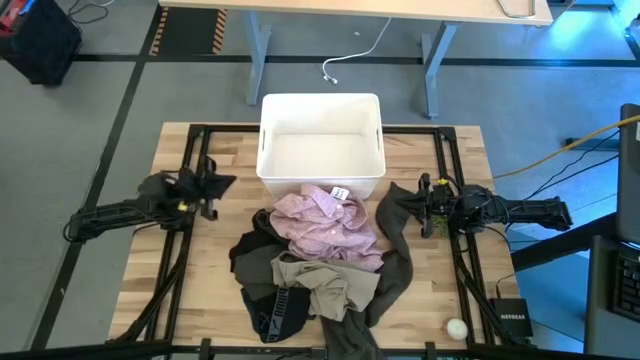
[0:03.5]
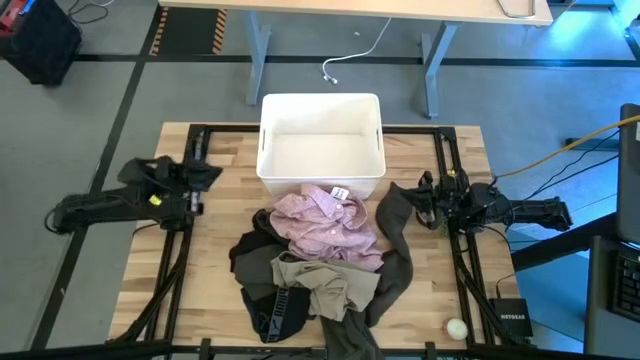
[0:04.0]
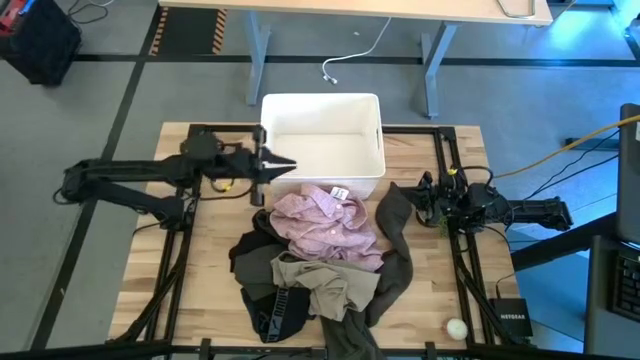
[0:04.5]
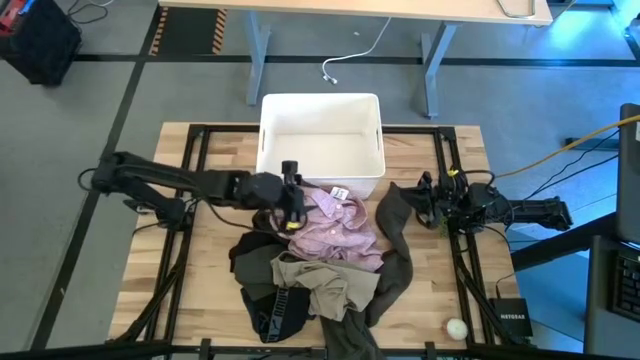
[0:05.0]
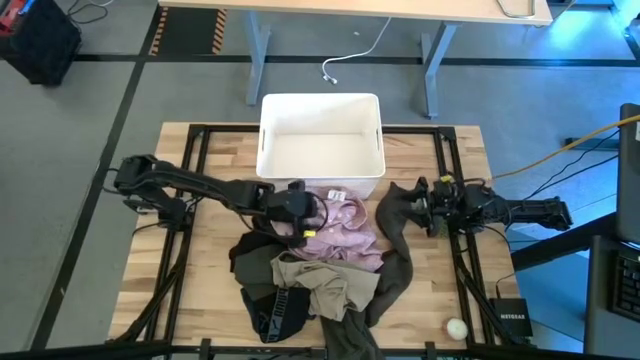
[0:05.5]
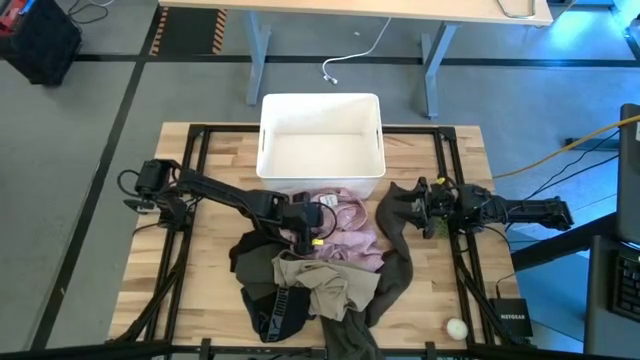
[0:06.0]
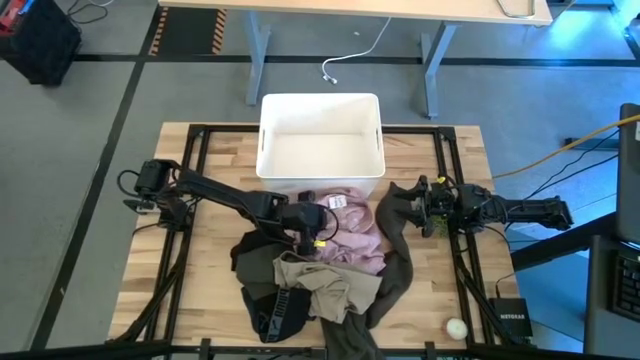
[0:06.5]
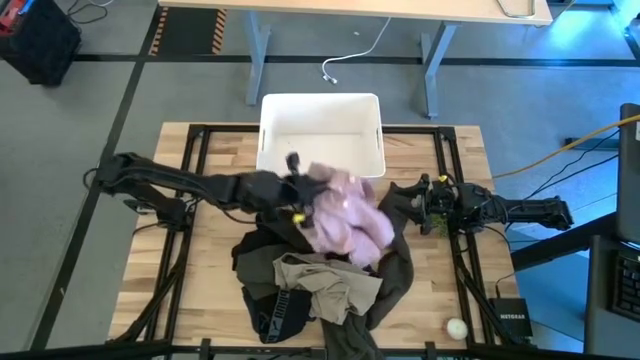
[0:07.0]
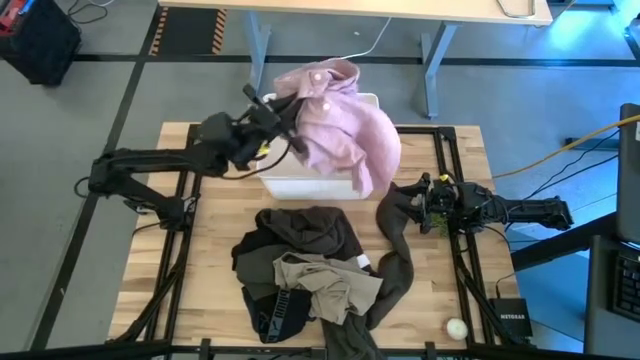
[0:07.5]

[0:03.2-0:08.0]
Task: Sort clothes
Put the pink shirt into the white bin

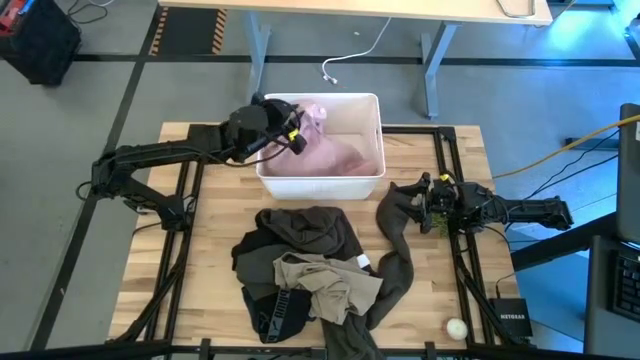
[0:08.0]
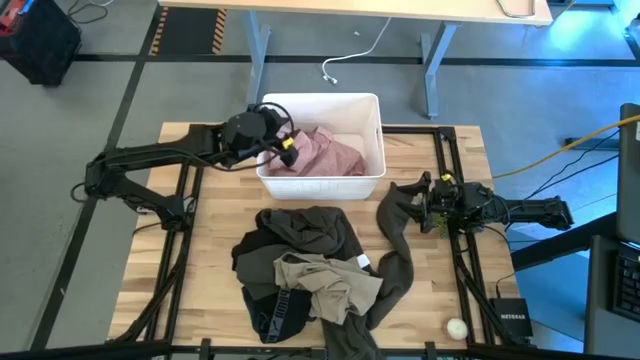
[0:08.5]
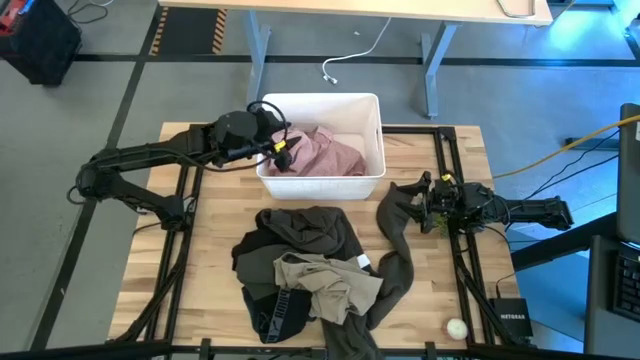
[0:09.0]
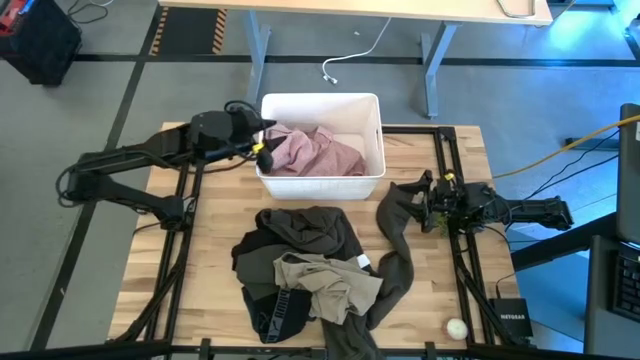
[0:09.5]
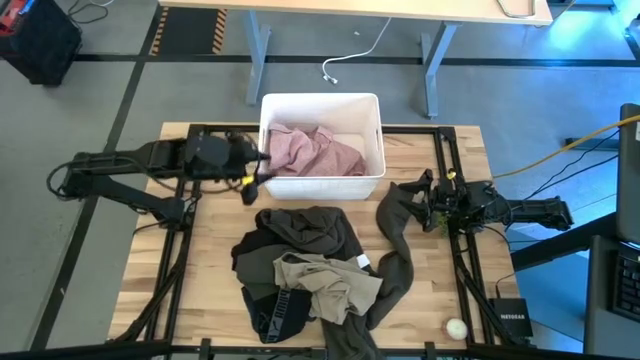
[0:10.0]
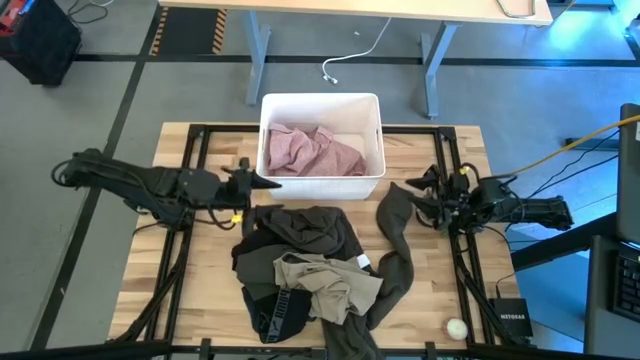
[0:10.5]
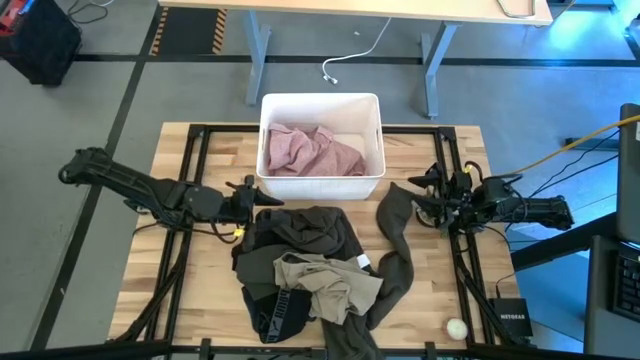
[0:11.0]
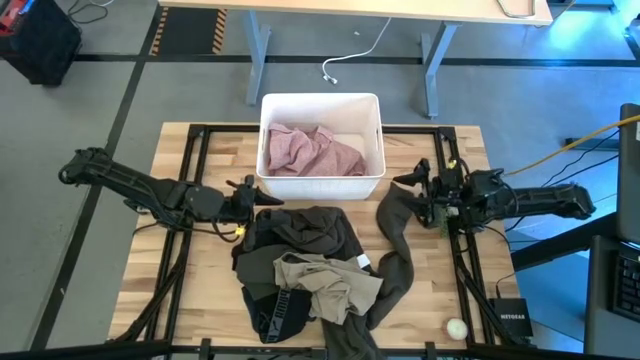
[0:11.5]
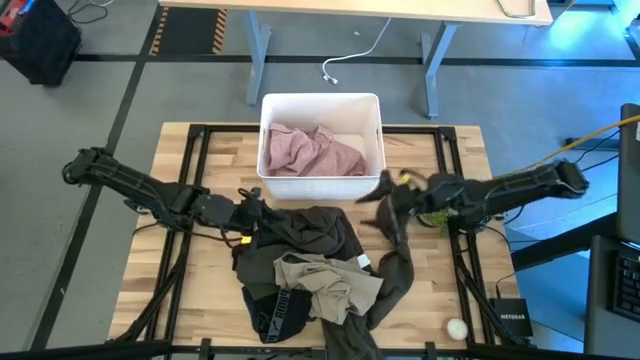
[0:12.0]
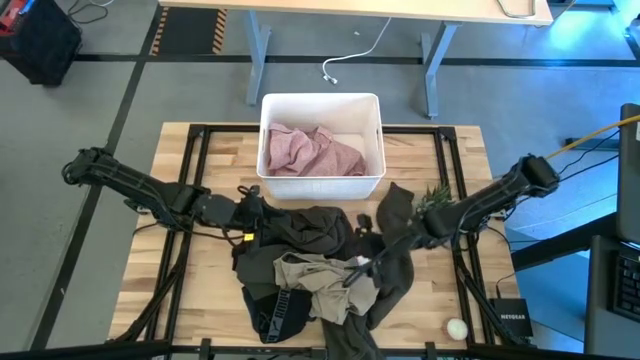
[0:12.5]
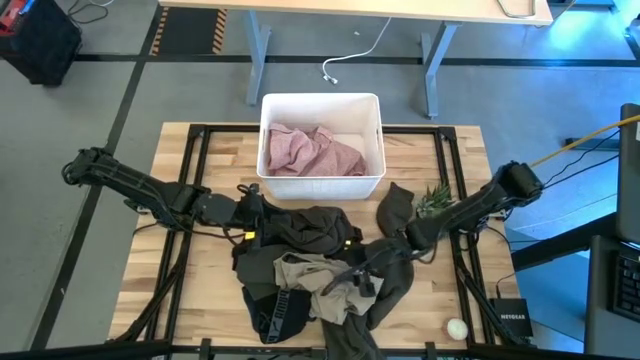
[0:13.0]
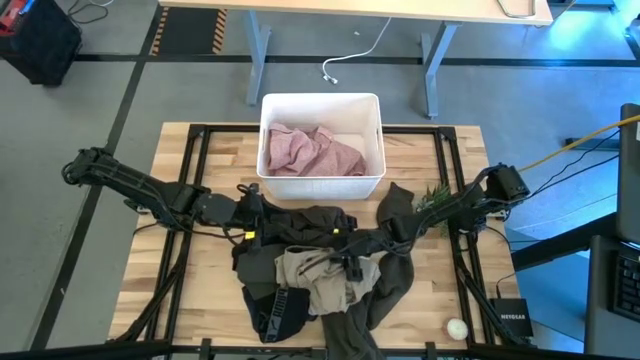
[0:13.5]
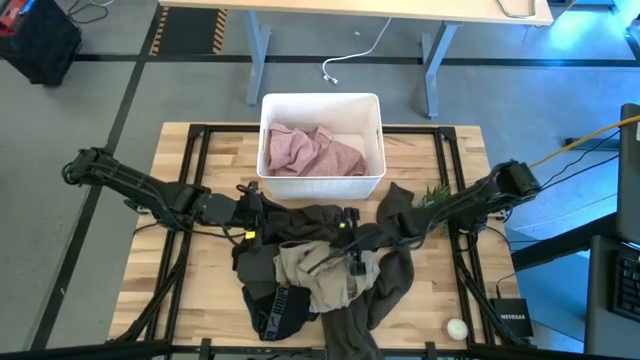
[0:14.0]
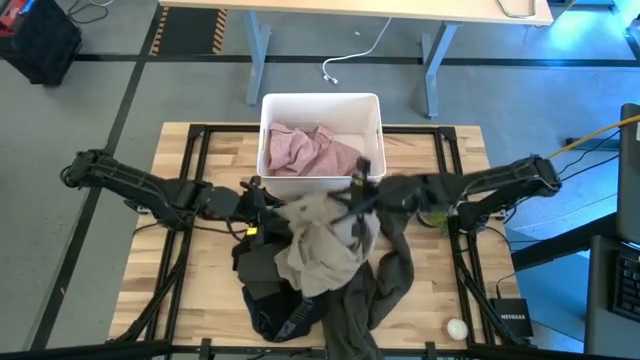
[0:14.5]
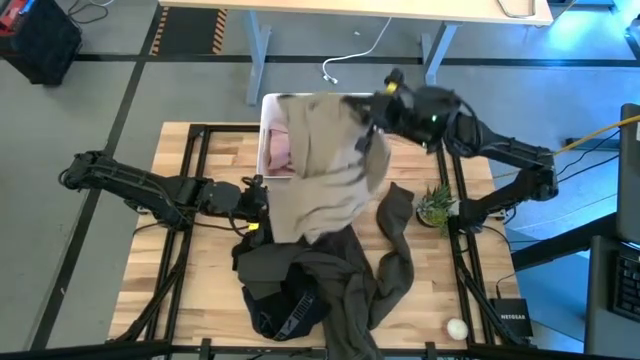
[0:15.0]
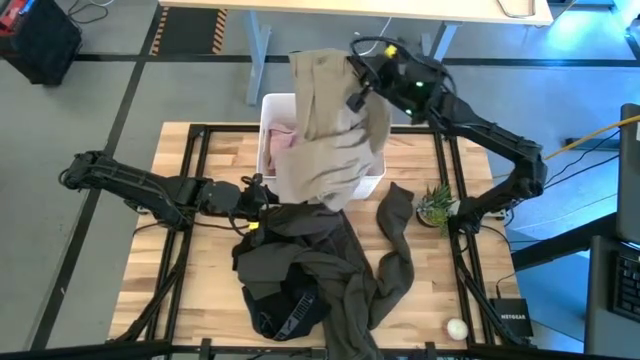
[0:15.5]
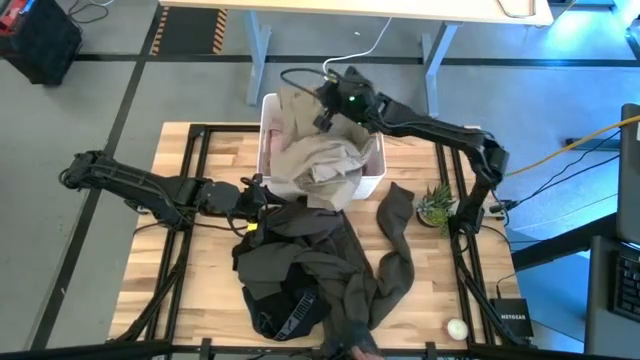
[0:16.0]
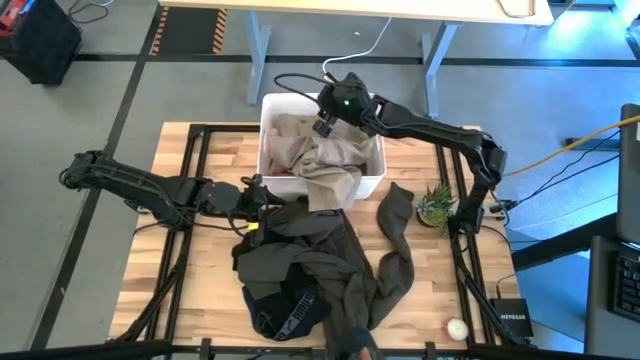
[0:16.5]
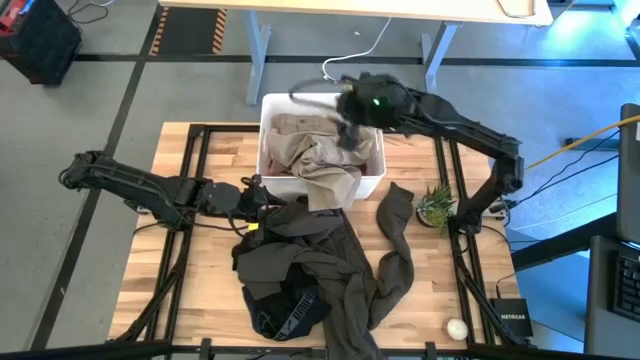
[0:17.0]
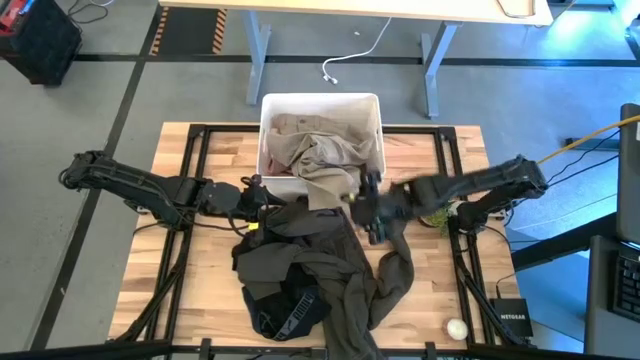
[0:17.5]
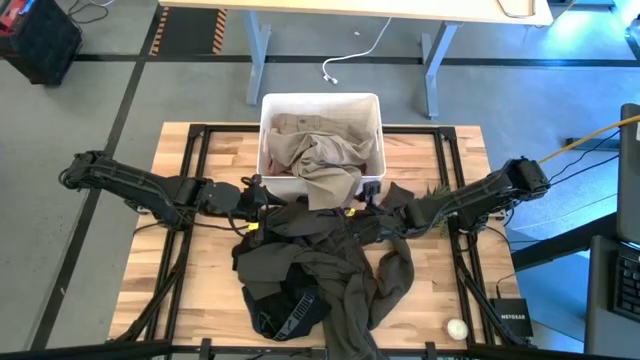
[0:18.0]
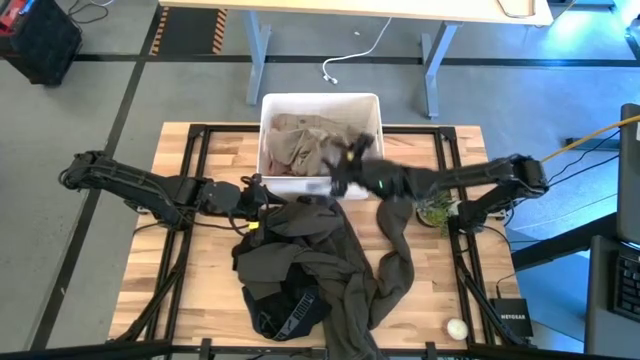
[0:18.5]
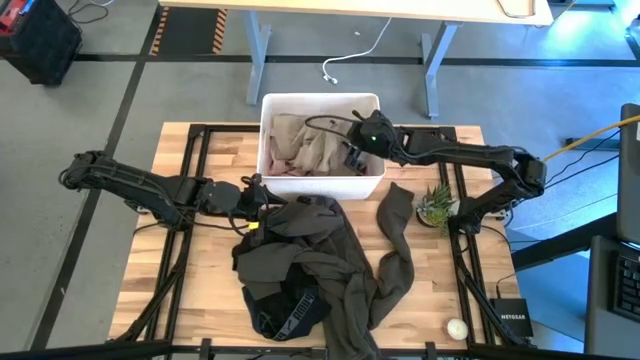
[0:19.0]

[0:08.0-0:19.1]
Put the gray pants into the white bin

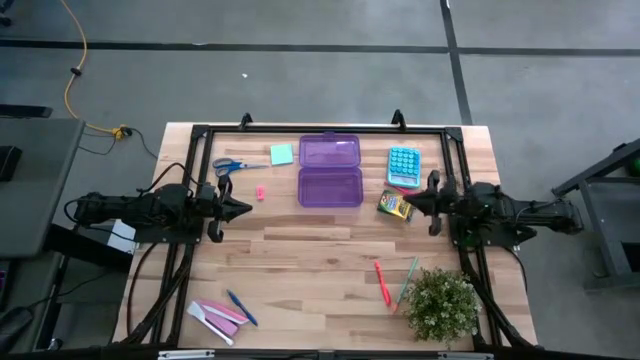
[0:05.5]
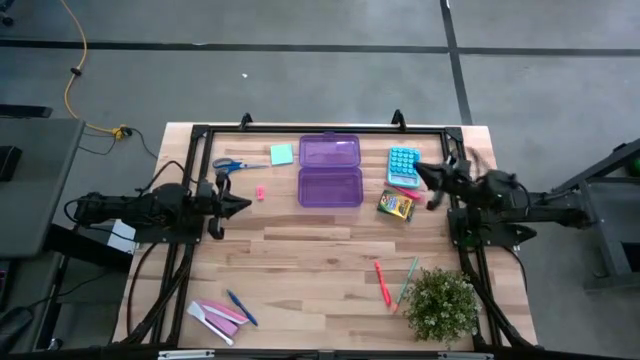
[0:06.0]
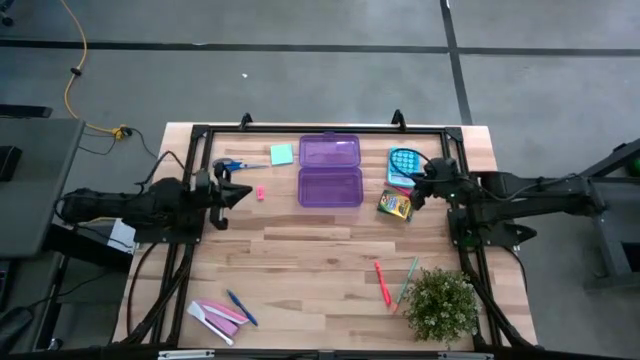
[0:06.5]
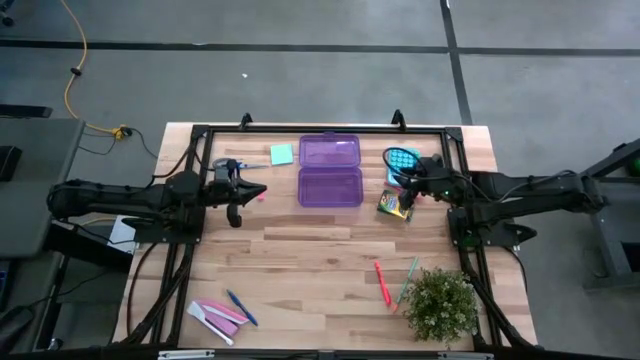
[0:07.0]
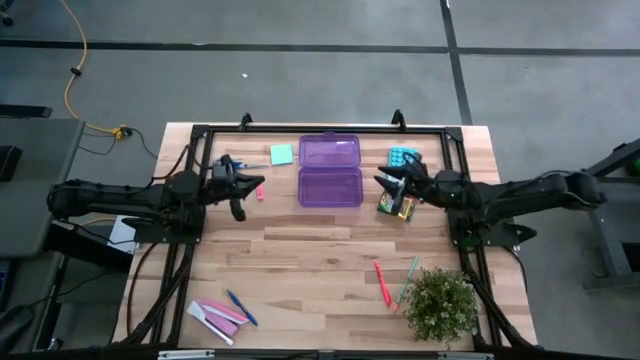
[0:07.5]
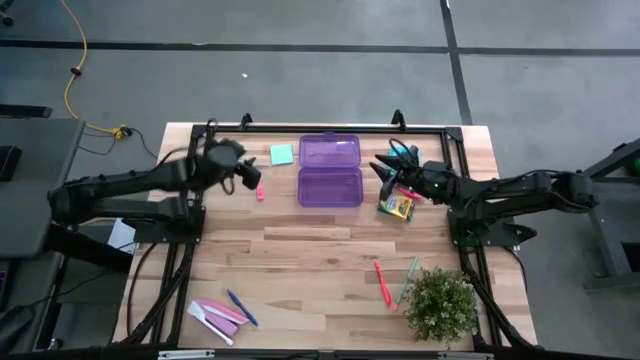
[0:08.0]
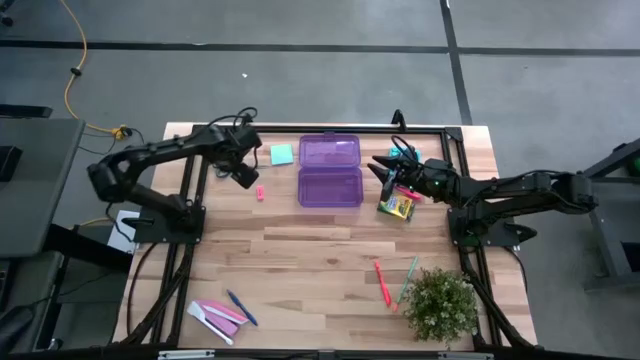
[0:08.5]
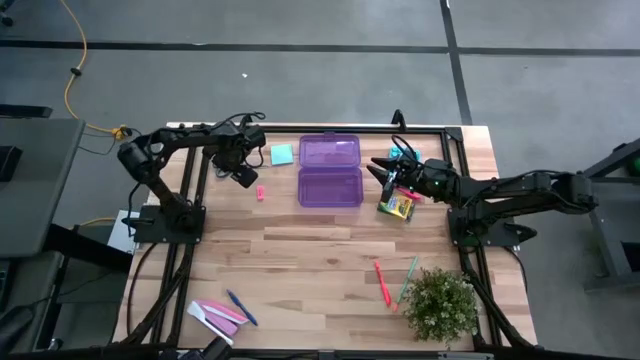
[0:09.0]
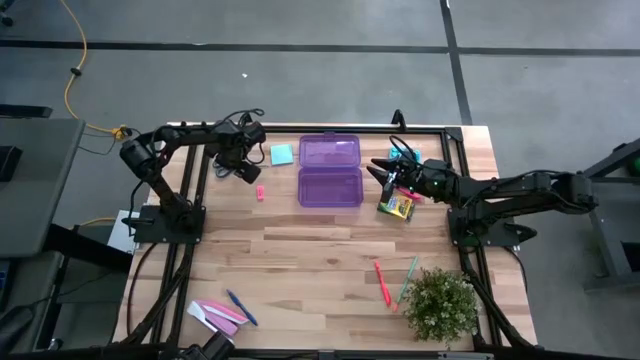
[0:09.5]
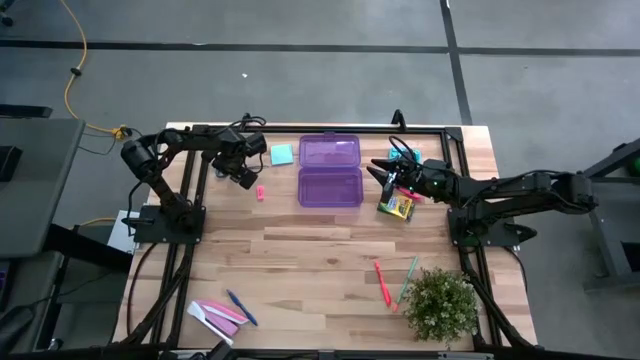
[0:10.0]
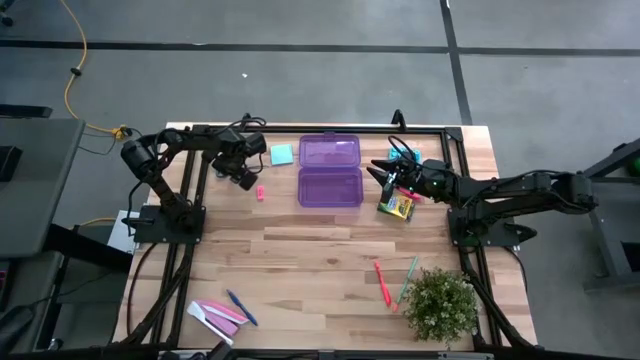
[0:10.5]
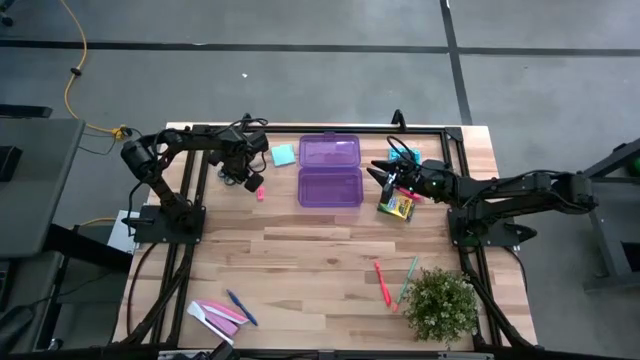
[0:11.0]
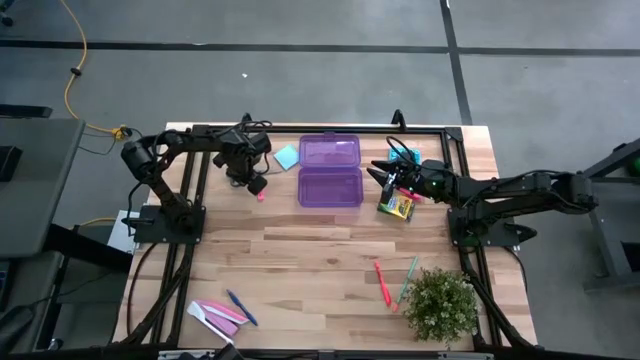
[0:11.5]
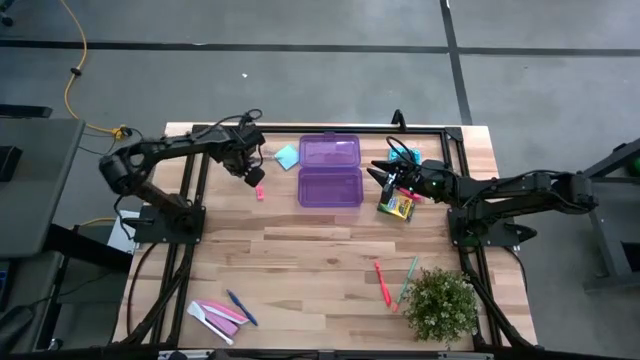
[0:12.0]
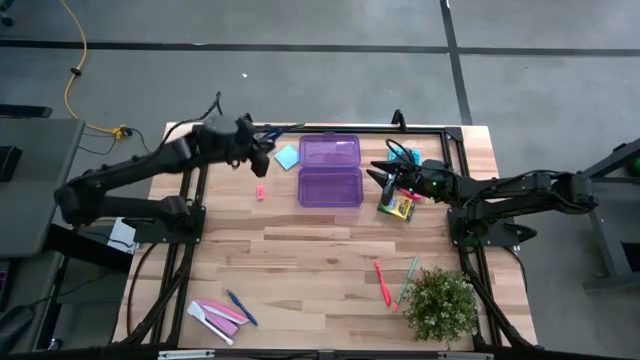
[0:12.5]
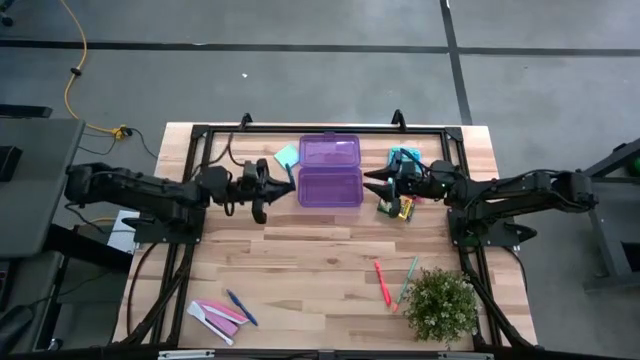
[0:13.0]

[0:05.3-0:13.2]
Task: Pack school essentials
Put the blue scissors into the violet supply box
